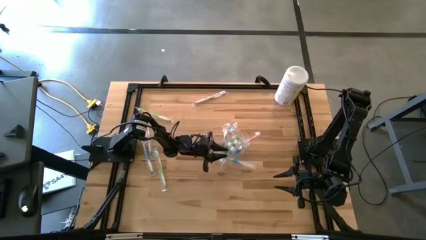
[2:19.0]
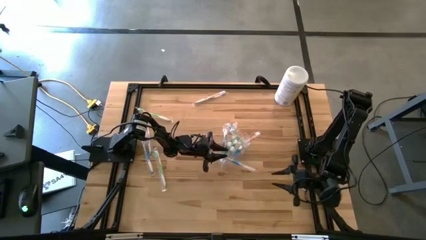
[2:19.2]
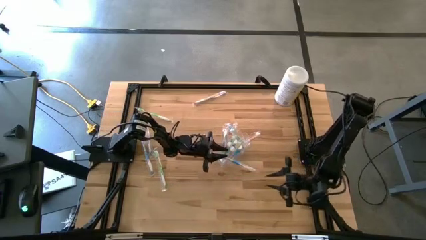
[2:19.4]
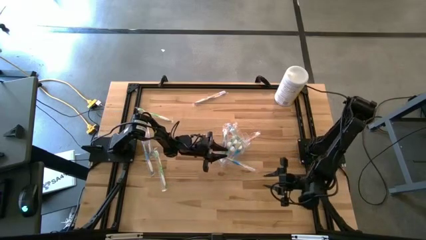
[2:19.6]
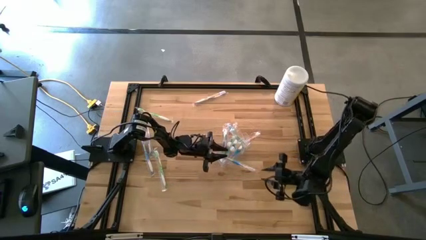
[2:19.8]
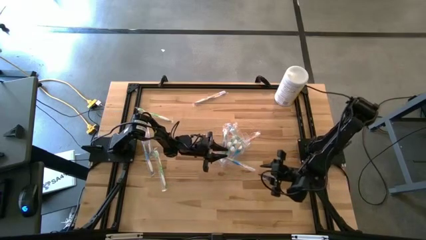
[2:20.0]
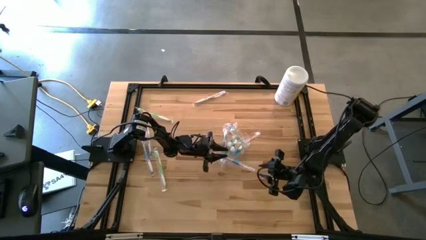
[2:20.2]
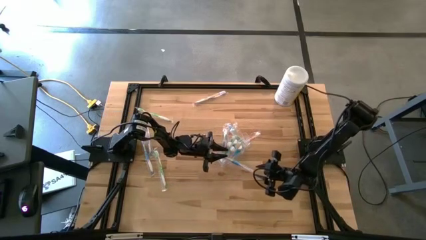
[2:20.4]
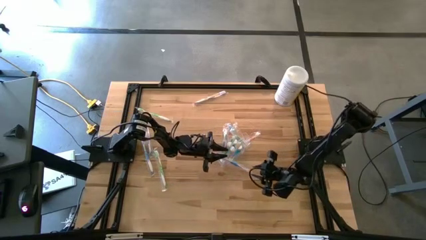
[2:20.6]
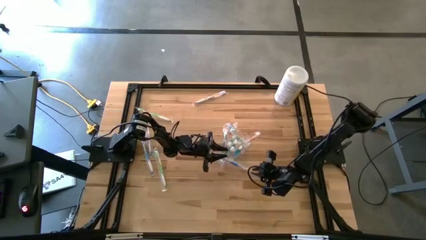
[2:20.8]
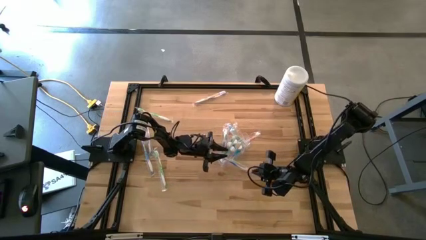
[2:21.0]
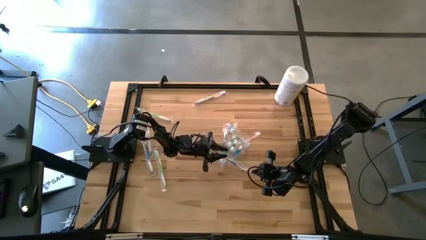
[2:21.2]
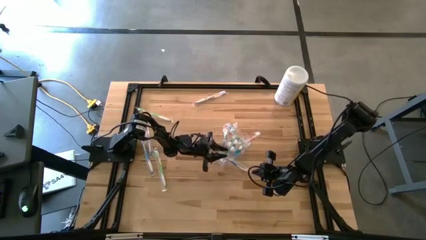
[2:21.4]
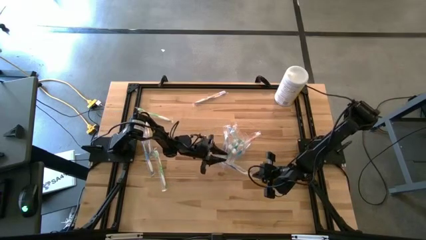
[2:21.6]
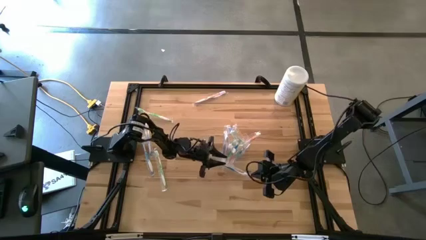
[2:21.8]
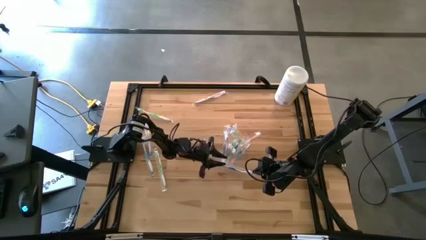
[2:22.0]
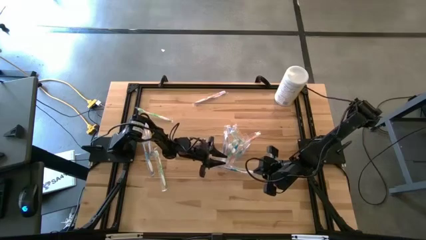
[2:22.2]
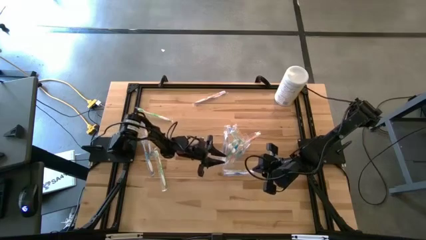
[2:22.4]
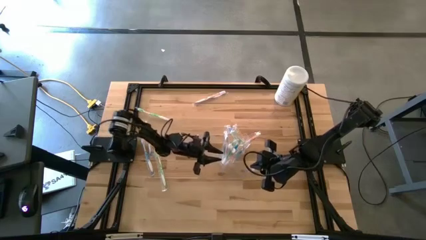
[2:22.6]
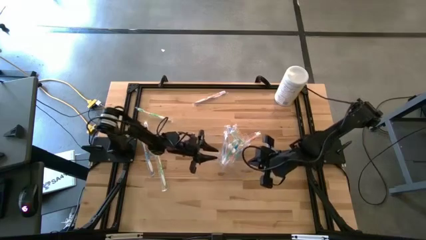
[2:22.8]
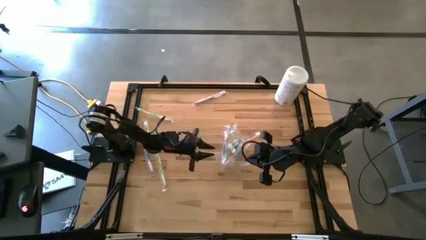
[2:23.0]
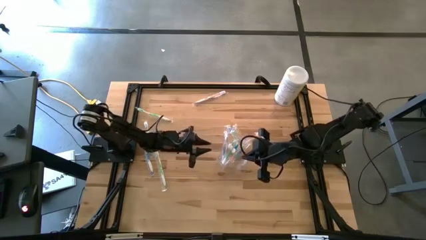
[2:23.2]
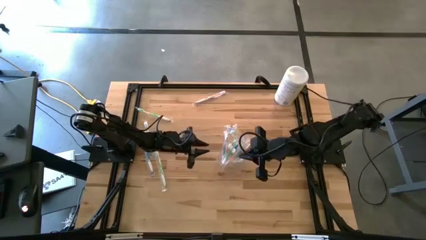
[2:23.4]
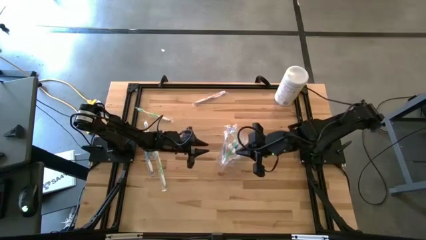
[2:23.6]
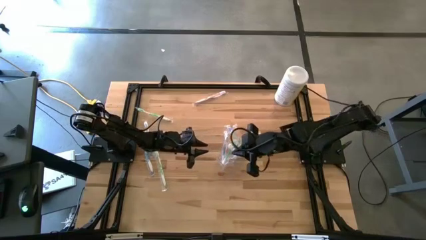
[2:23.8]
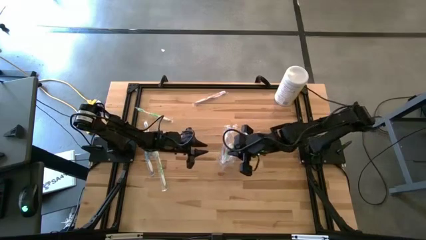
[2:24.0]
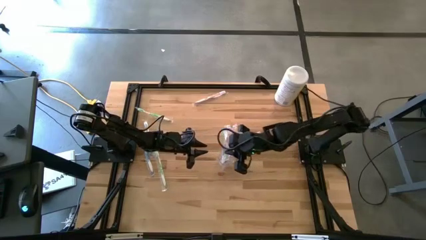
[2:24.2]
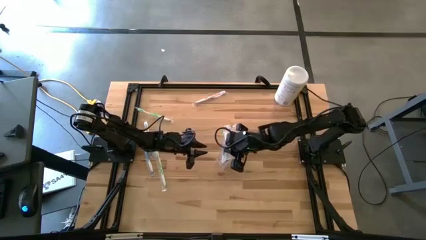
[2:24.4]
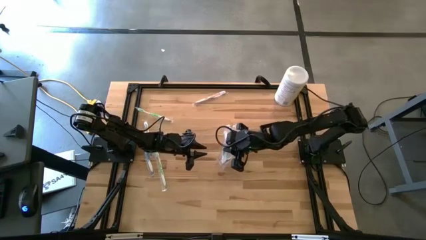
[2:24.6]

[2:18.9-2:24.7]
Task: Pick & Place toothbrushing station
Put the blue toothbrush into the transparent organizer

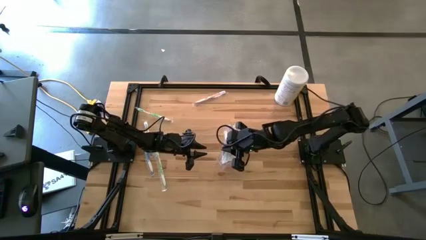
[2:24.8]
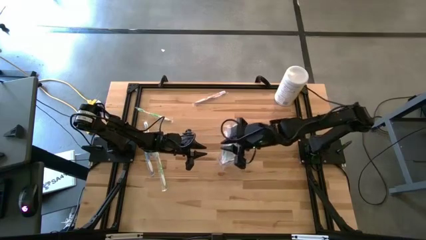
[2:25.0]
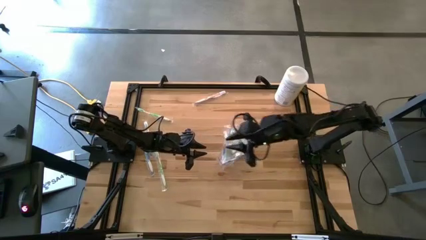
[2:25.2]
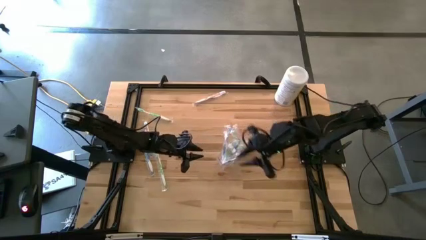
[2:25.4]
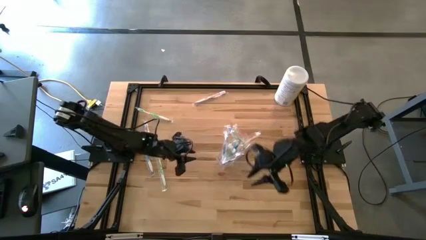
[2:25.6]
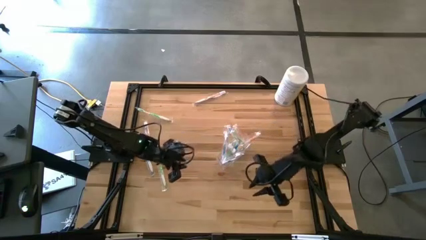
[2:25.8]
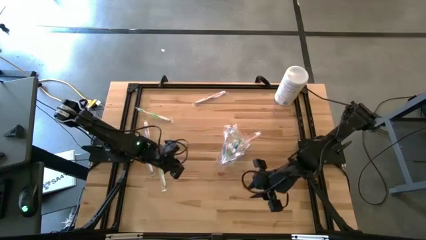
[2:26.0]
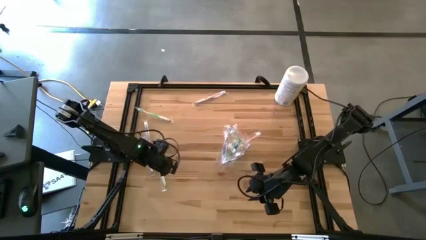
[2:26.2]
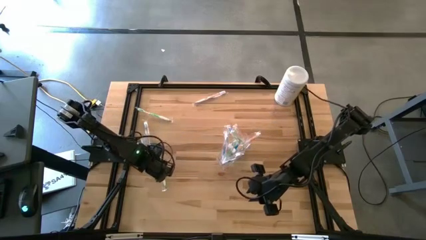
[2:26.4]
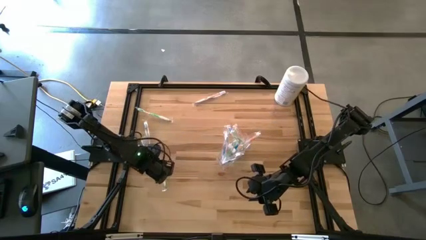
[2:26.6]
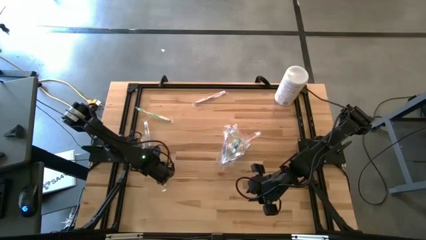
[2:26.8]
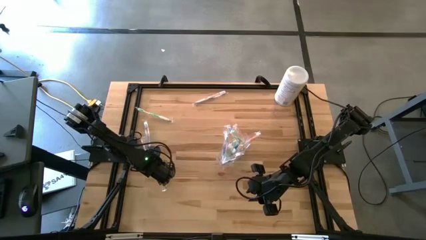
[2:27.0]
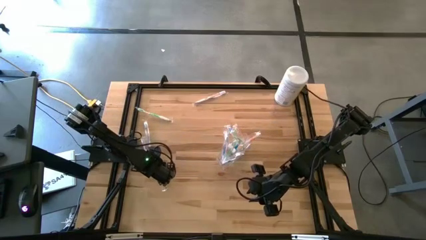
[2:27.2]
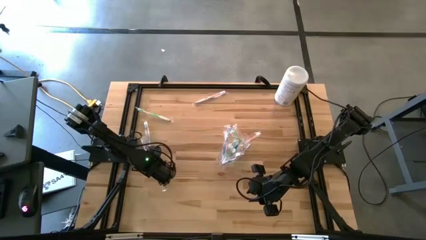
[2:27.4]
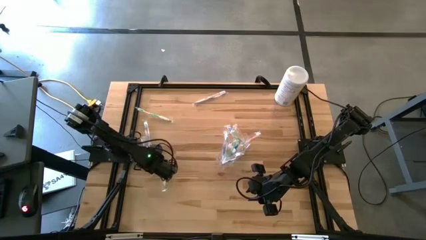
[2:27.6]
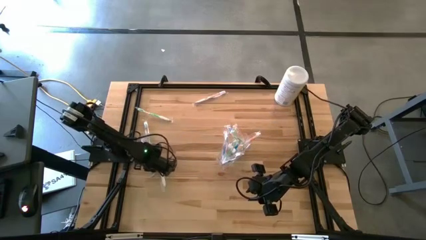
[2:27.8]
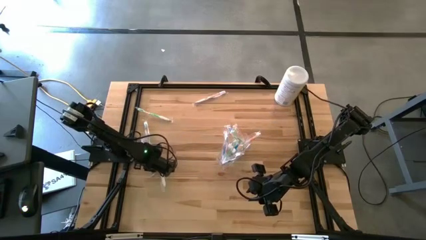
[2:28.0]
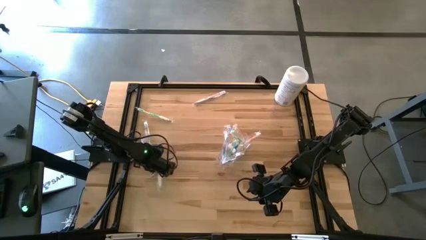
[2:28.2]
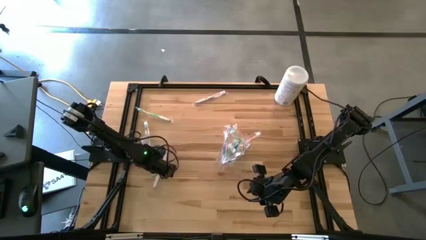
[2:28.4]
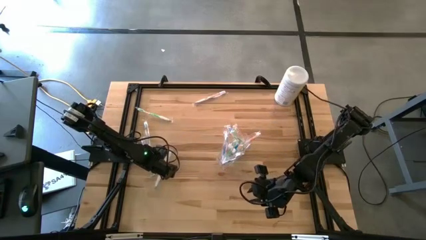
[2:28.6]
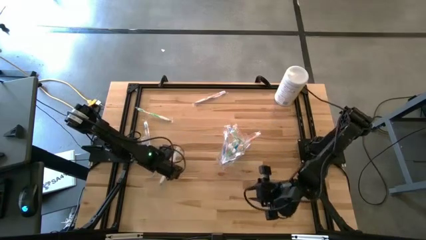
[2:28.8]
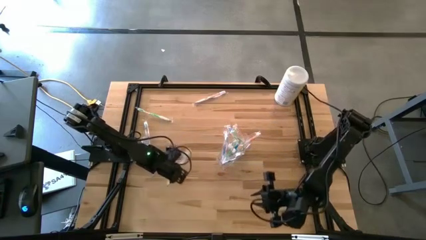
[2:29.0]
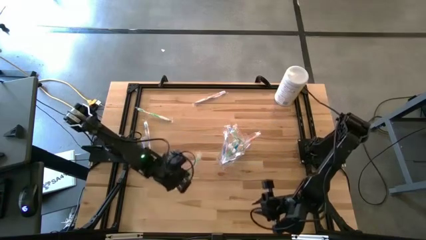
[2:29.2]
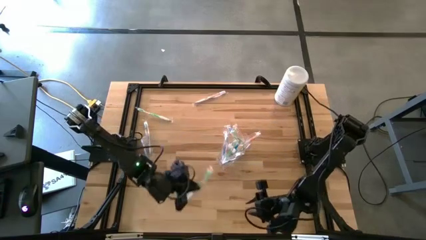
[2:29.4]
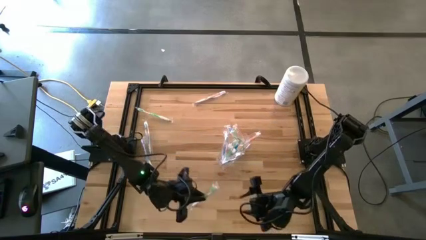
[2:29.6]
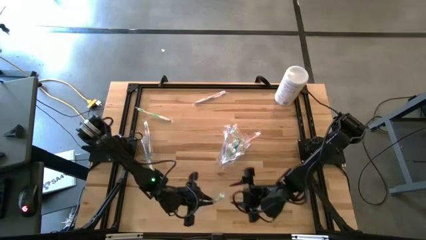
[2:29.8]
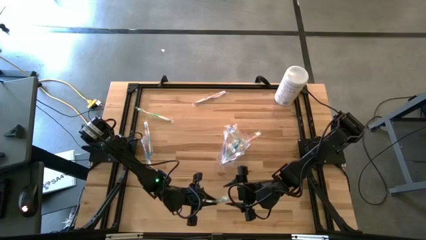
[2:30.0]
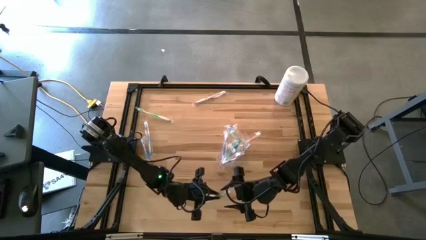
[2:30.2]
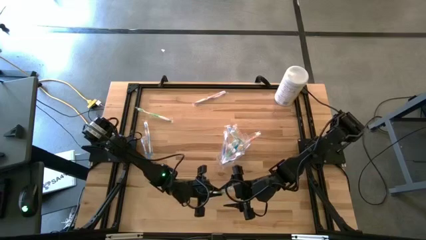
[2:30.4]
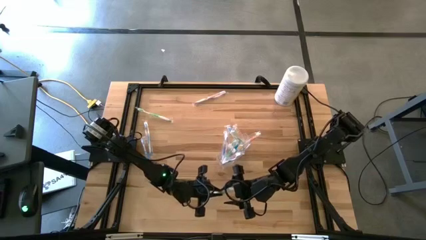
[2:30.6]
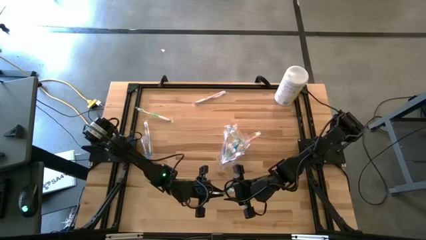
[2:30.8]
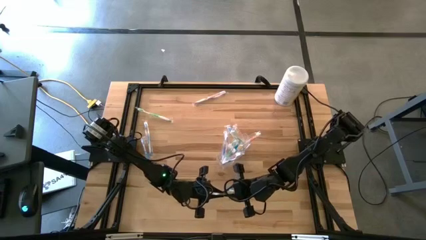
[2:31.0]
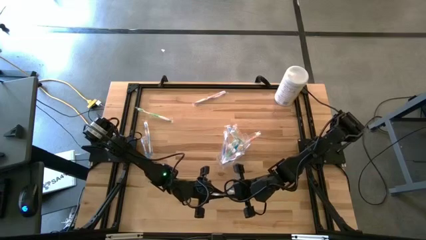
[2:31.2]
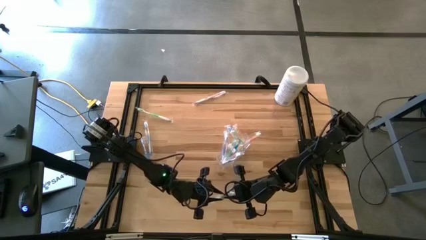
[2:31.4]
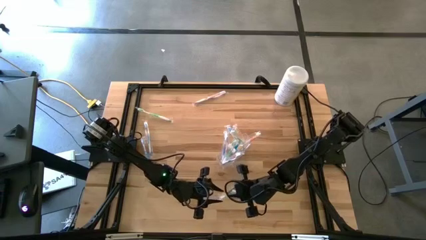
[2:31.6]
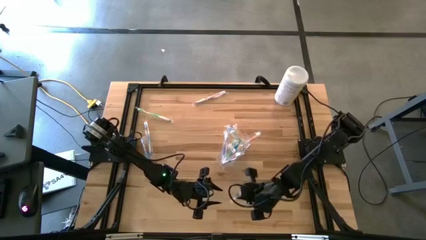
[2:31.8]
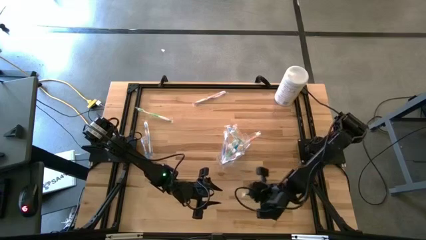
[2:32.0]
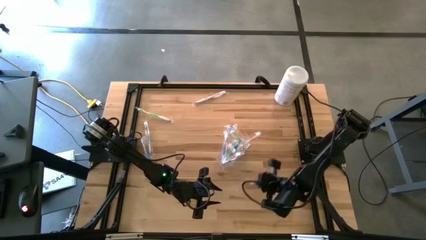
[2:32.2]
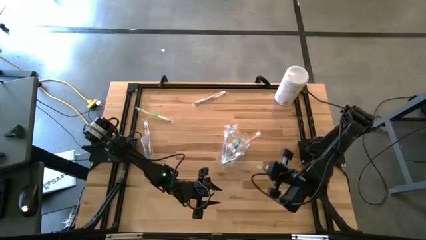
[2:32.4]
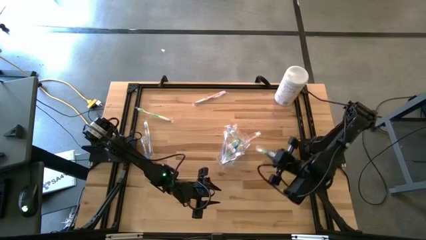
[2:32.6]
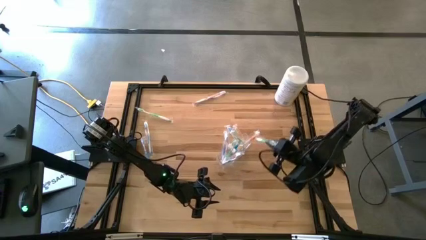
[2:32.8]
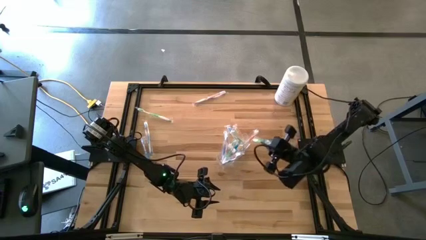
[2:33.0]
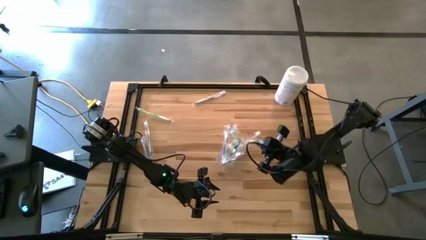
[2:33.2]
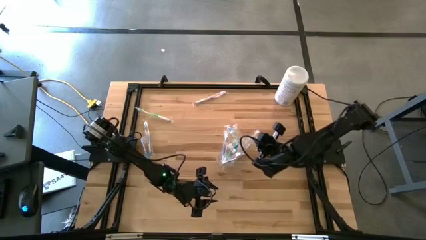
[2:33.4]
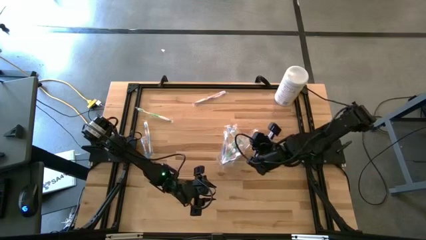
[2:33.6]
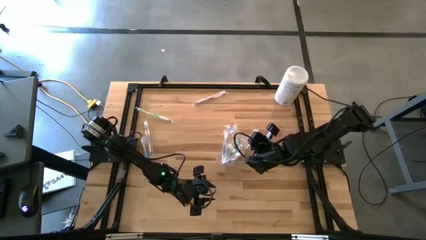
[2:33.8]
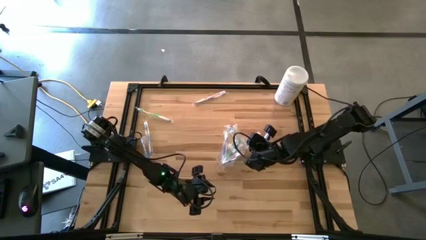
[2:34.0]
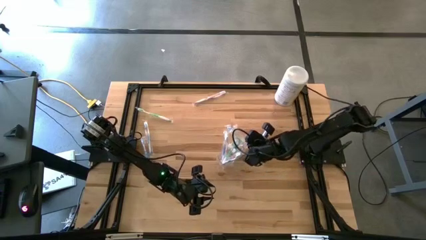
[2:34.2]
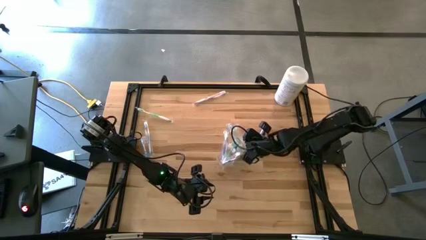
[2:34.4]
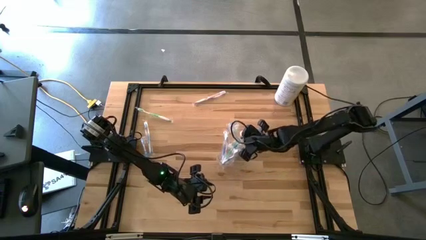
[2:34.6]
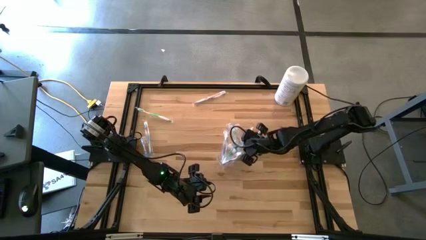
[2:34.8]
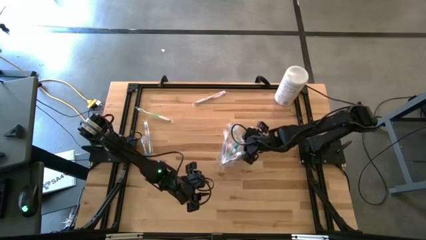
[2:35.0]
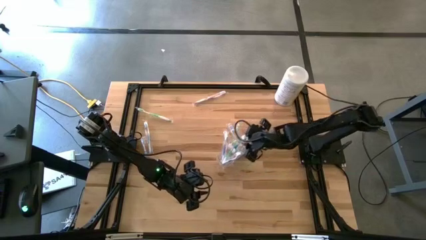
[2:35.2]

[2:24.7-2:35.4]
Put the green toothbrush into the transparent organizer
